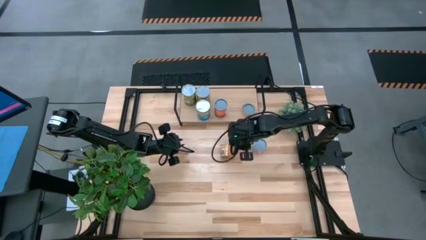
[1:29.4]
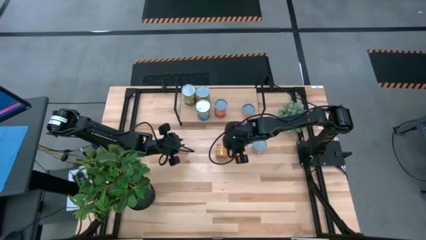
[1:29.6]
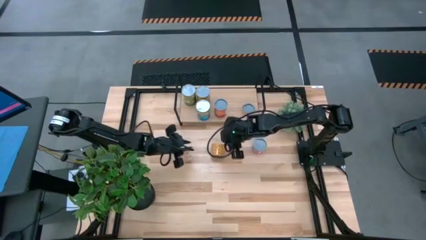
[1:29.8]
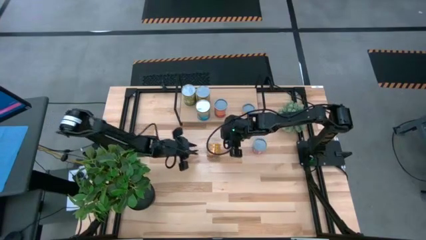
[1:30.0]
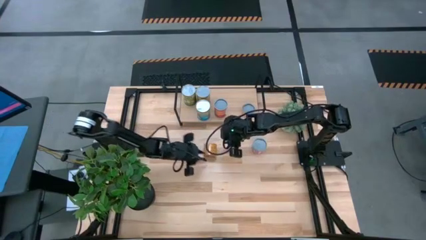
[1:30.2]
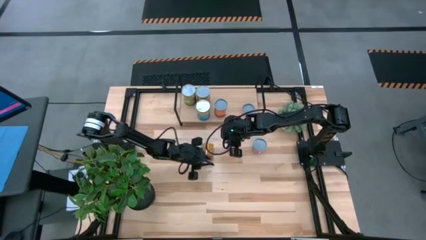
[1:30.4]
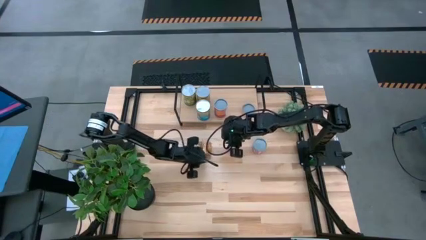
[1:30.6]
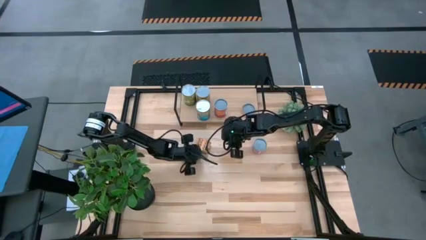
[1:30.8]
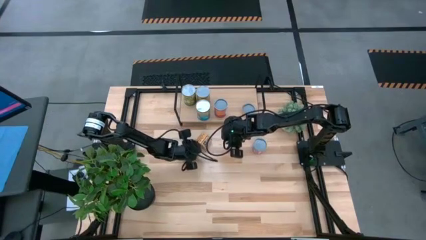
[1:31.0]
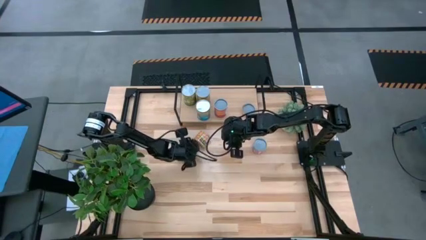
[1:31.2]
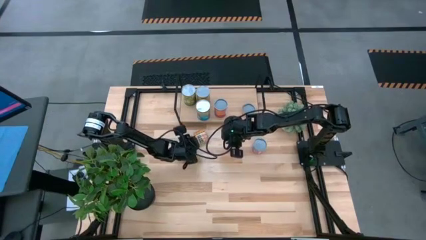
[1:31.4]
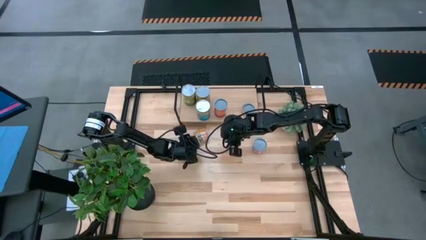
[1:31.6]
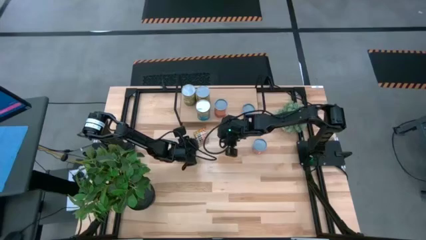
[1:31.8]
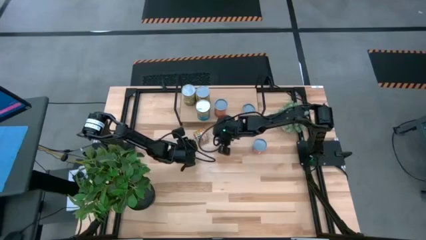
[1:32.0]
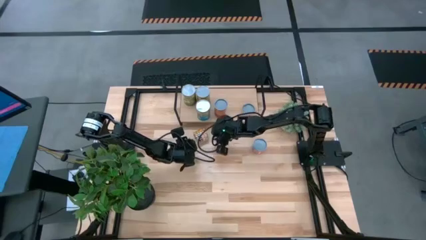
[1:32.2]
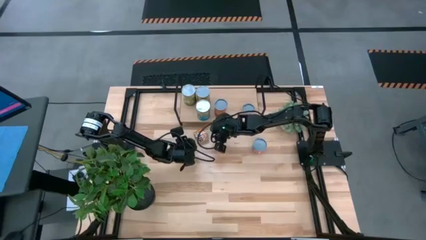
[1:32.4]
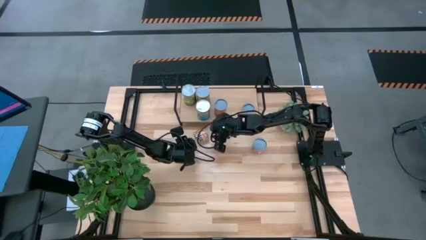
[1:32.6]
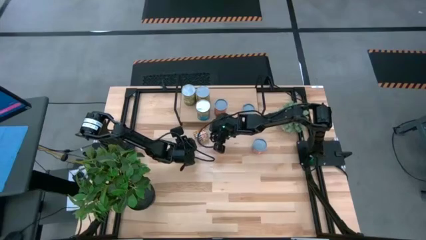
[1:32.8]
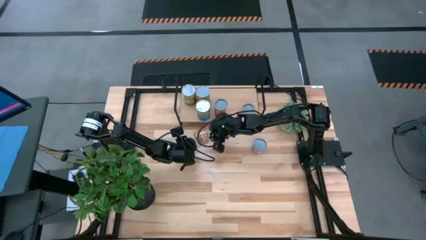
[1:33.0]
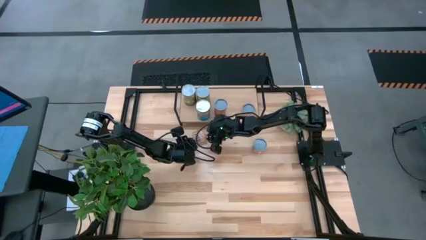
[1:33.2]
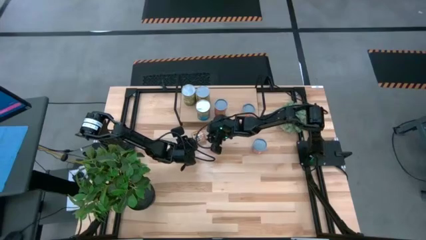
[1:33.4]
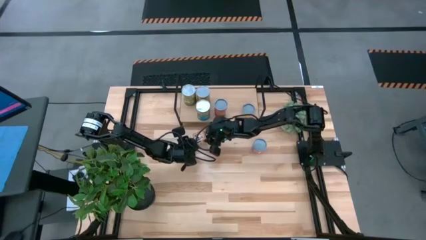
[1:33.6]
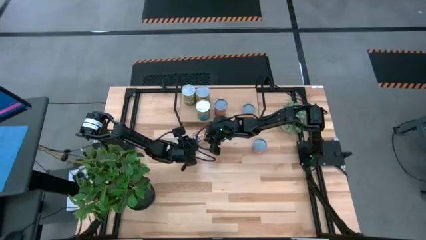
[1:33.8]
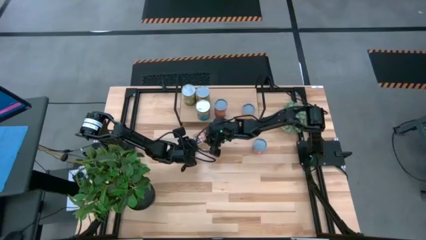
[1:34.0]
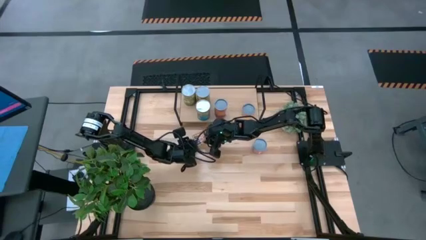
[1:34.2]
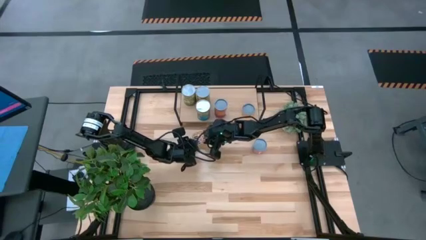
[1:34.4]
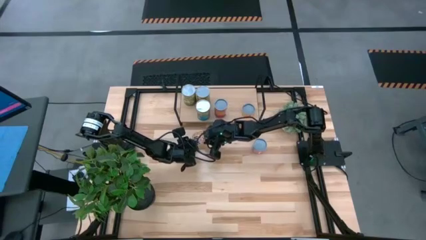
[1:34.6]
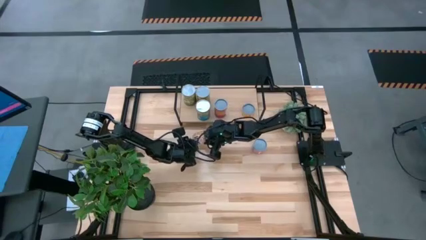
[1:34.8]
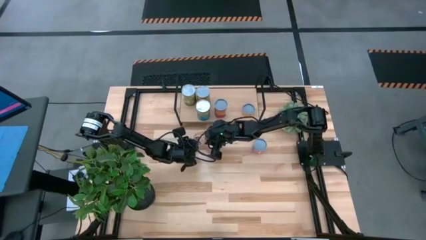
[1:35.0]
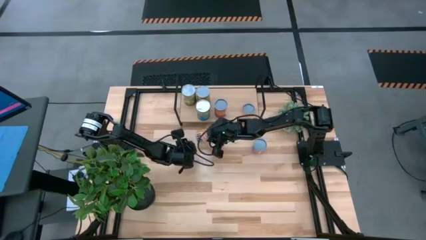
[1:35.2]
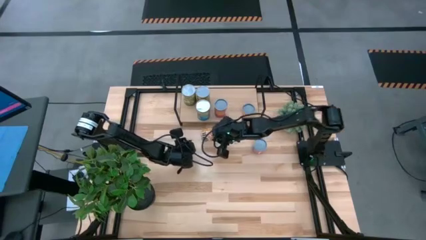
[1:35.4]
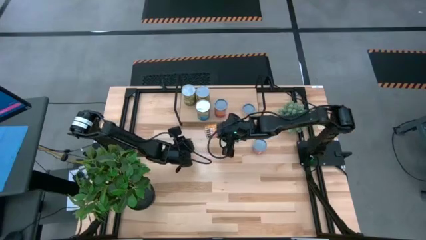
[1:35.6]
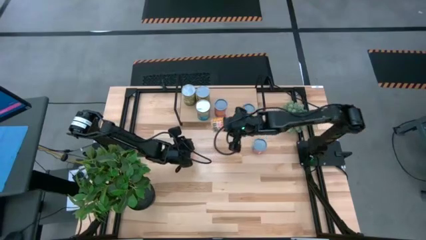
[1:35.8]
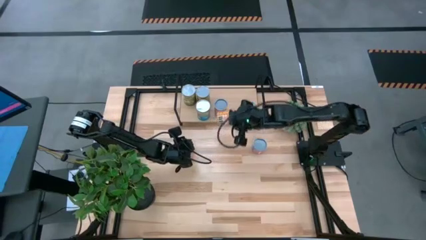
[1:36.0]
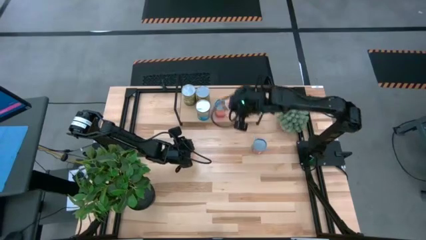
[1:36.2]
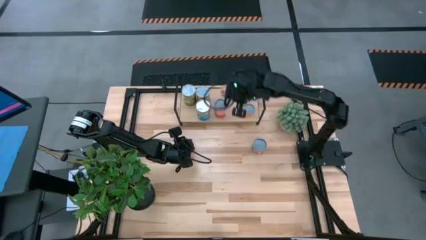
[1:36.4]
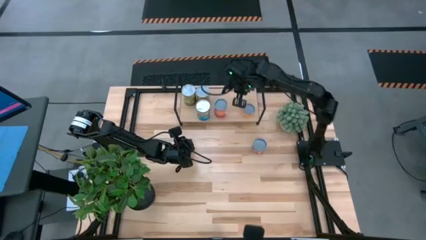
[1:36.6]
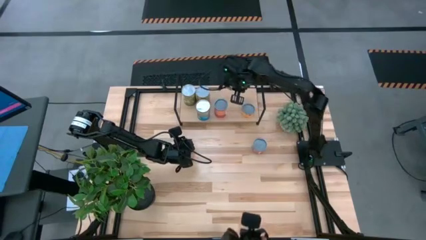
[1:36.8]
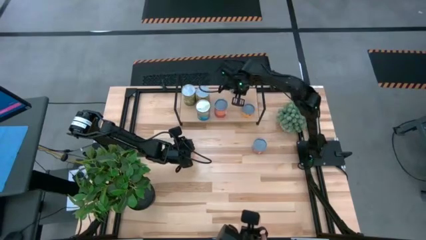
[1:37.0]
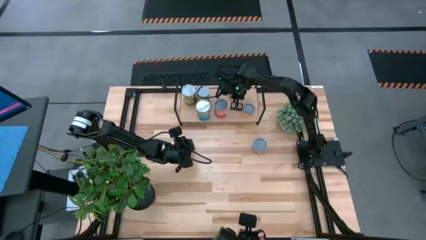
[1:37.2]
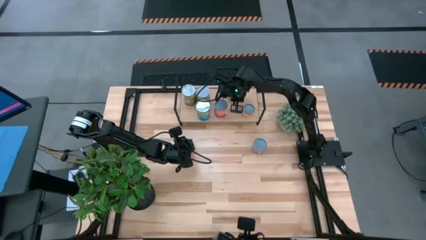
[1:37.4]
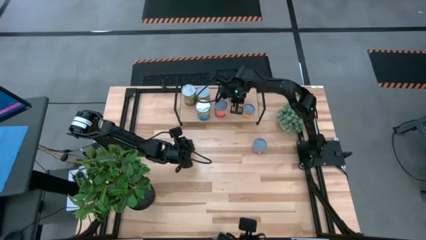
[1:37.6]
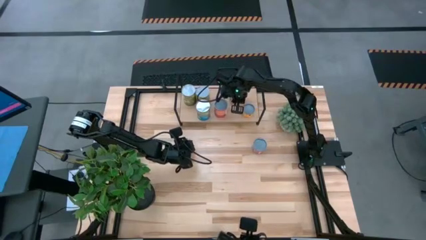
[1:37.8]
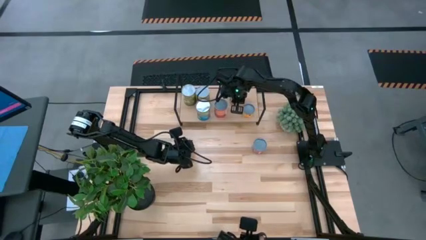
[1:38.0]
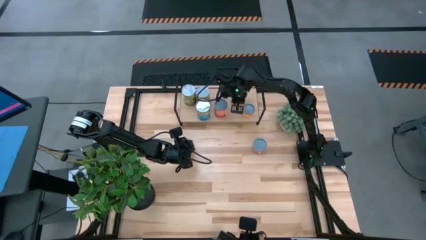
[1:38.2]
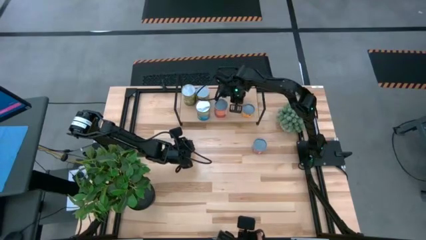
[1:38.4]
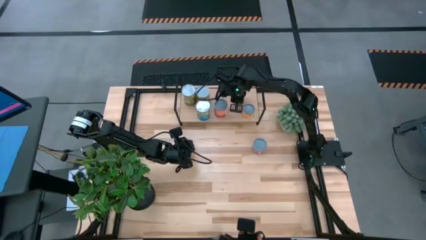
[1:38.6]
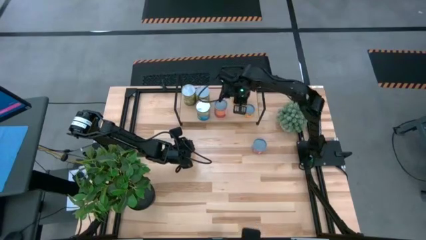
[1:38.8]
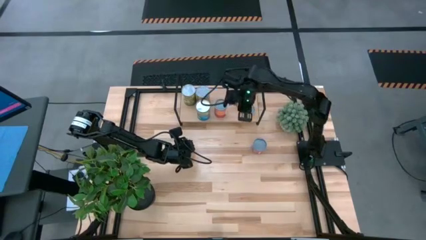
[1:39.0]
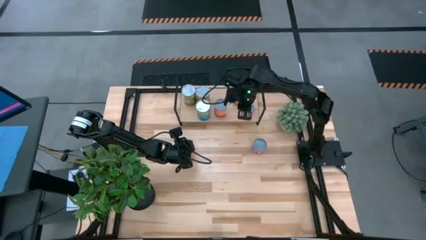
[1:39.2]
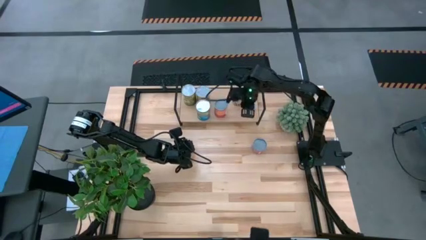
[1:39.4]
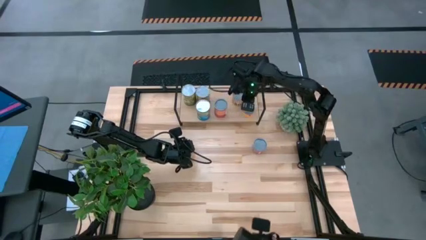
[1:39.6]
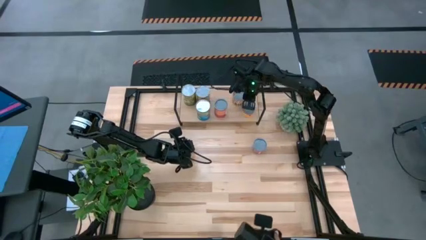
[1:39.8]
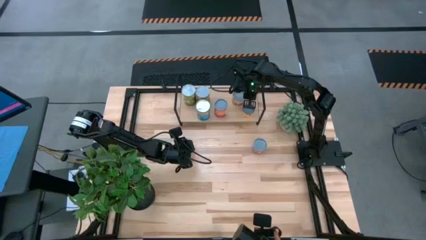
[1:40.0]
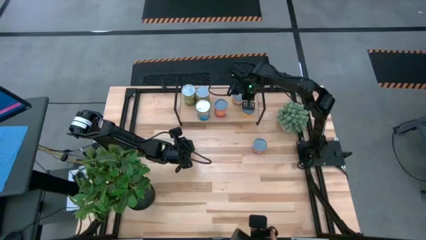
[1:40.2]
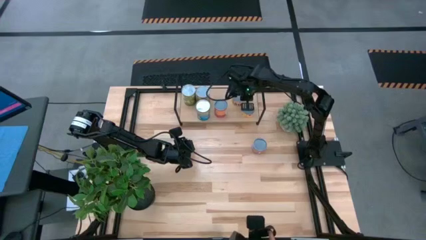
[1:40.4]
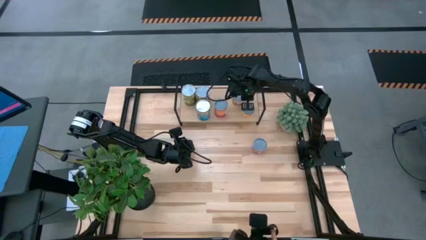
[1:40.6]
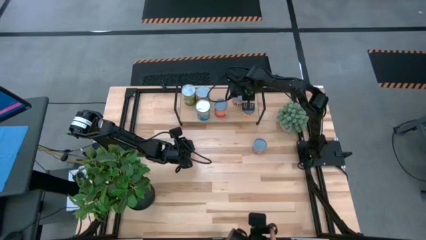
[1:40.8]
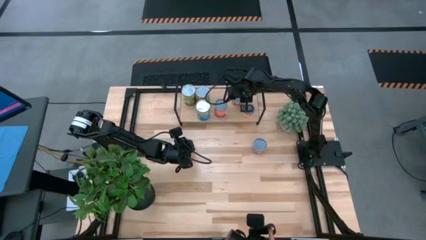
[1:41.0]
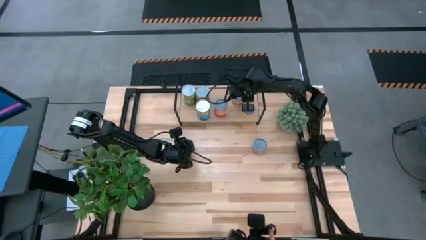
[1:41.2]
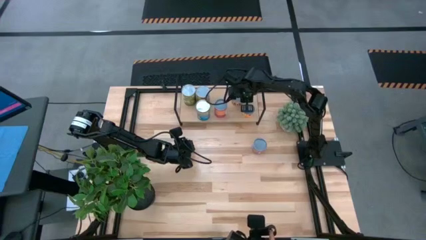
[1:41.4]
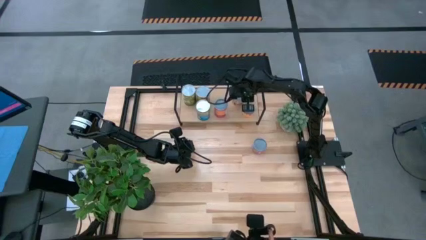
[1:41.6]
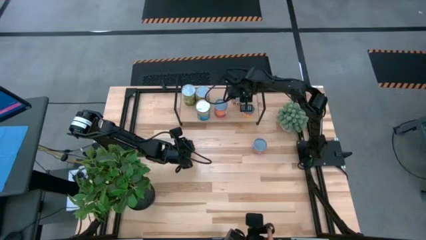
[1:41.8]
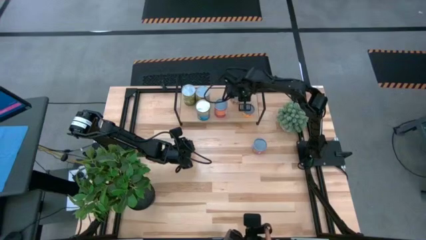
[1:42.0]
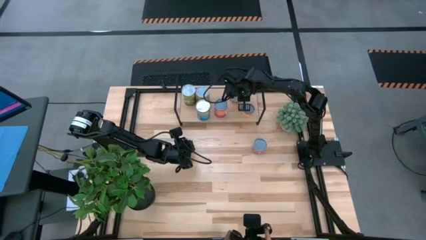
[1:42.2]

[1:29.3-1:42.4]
Task: Pick and place cans onto a shelf
Put the canned black beans on the shelf
